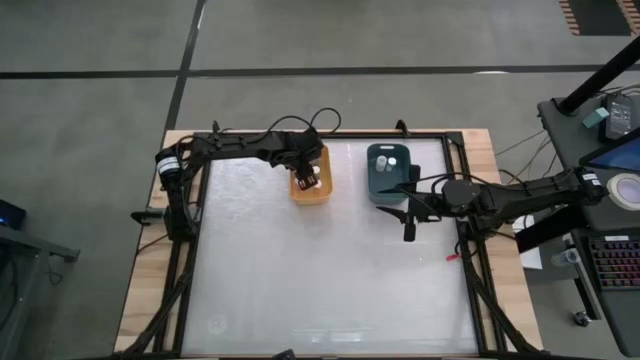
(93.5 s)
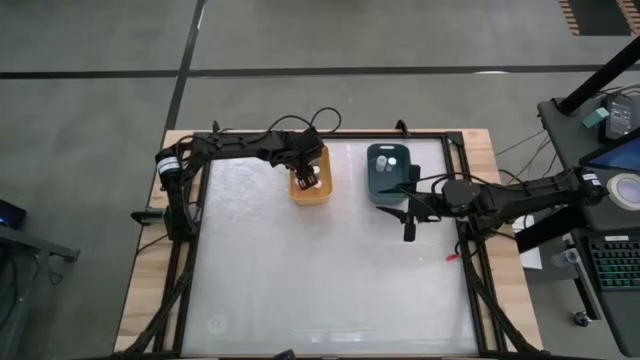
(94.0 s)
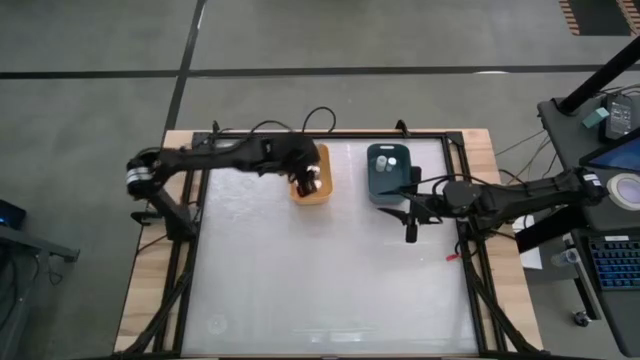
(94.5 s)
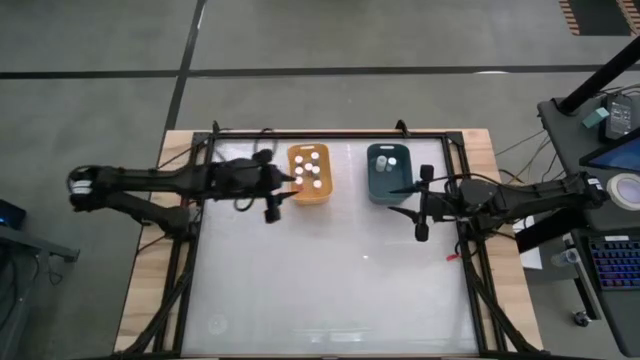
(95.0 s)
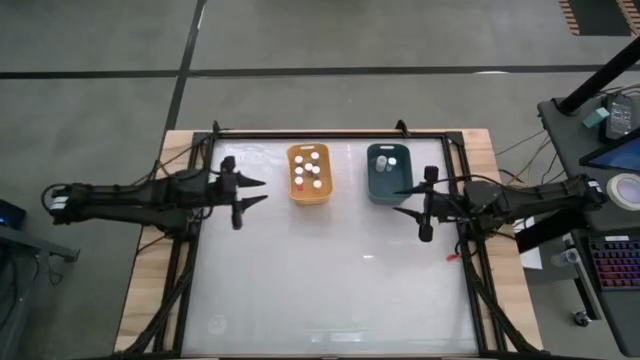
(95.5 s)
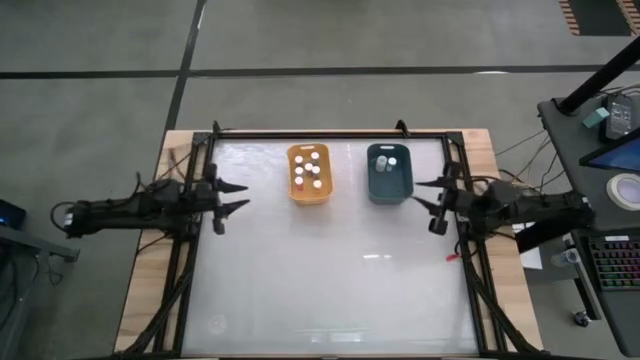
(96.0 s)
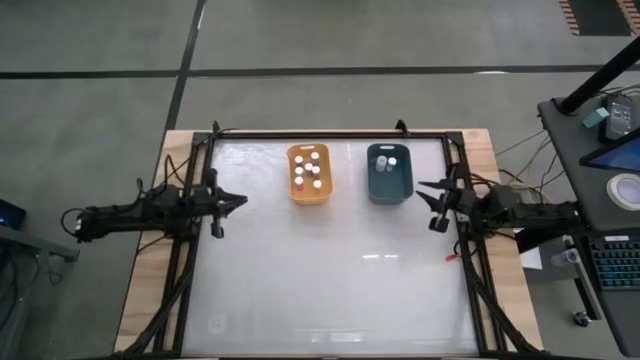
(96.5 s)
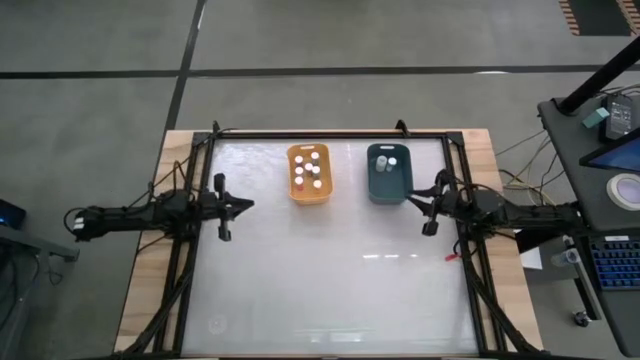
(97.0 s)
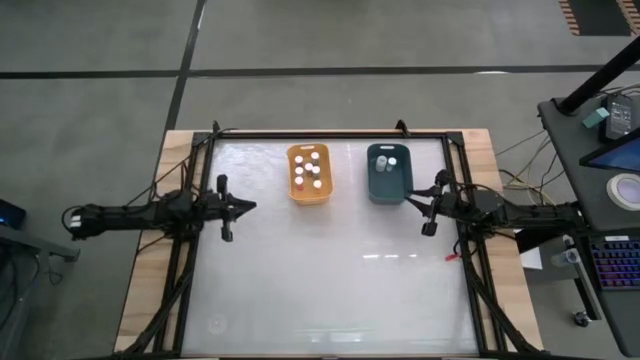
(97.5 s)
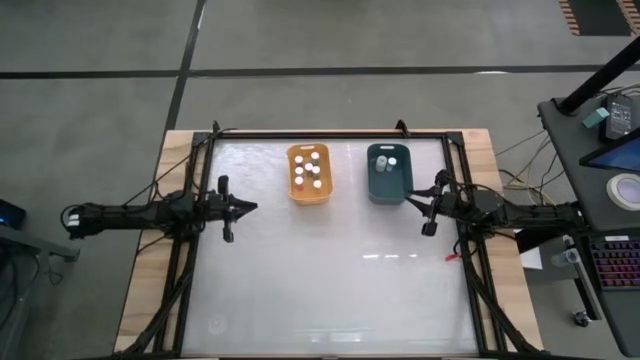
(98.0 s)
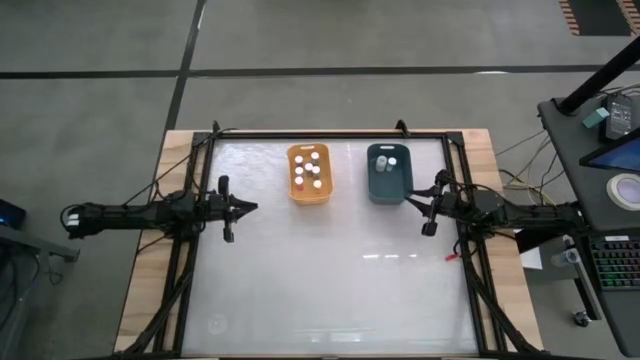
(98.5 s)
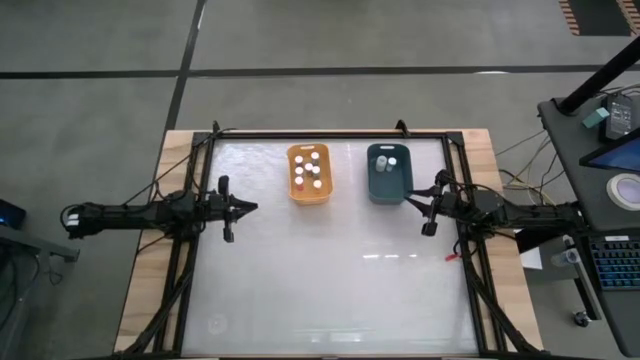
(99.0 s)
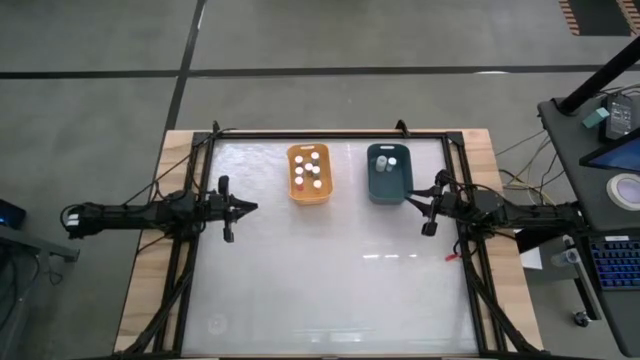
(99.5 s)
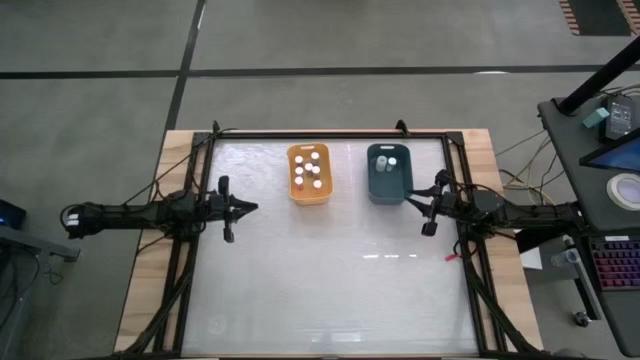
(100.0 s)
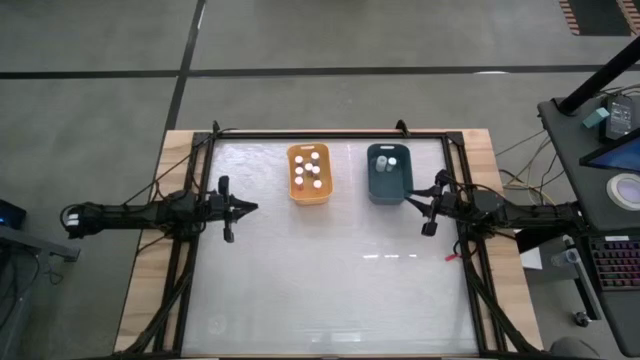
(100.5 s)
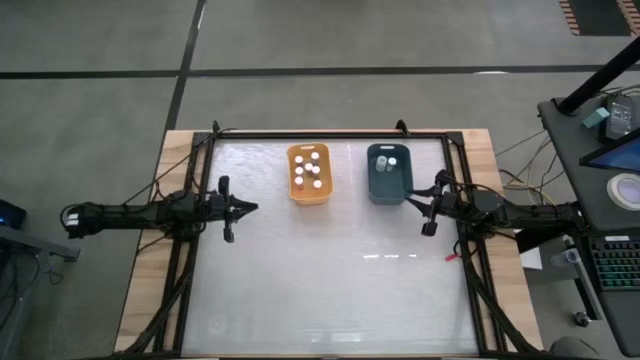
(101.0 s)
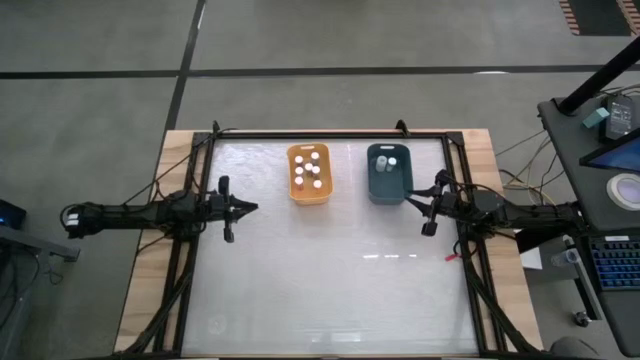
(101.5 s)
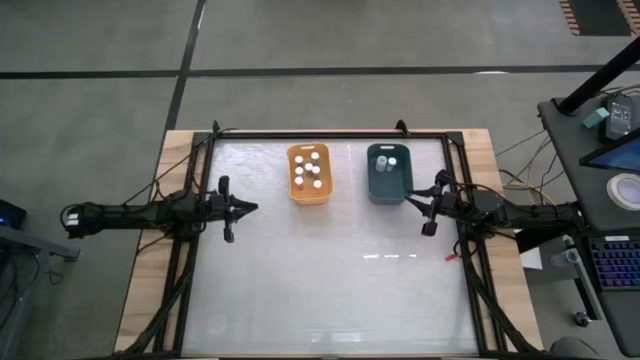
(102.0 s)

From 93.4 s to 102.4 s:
Task: Pick and place medicine bottles into bin by pill shape (circle, oval)
Return to Home Position

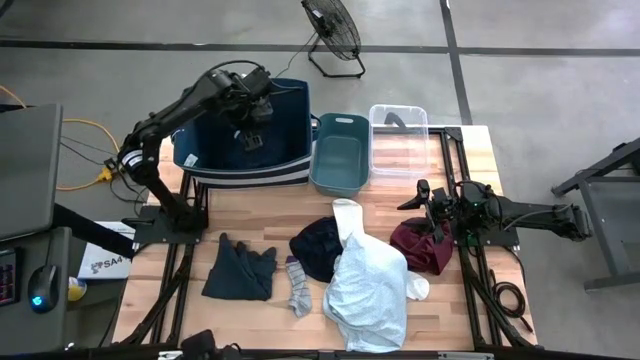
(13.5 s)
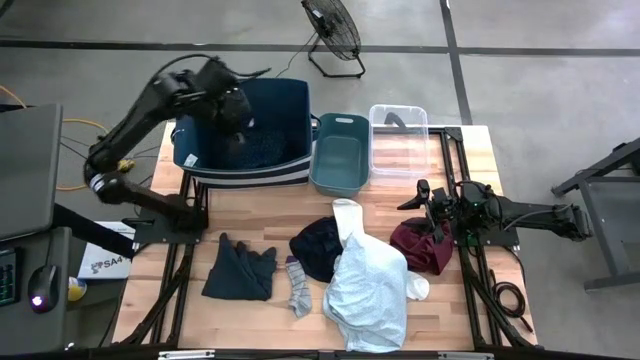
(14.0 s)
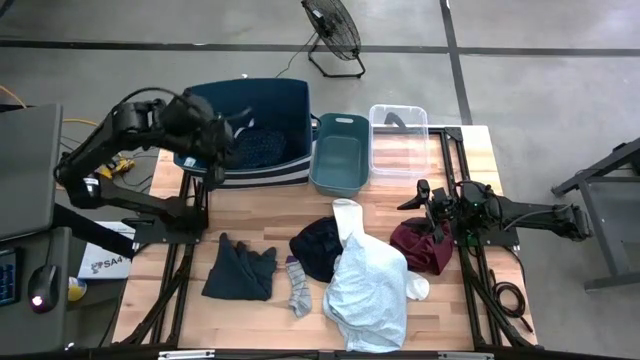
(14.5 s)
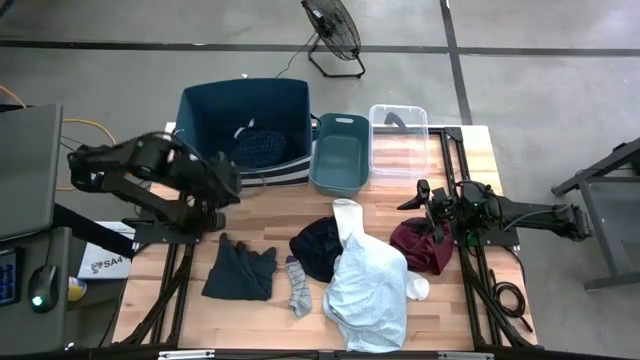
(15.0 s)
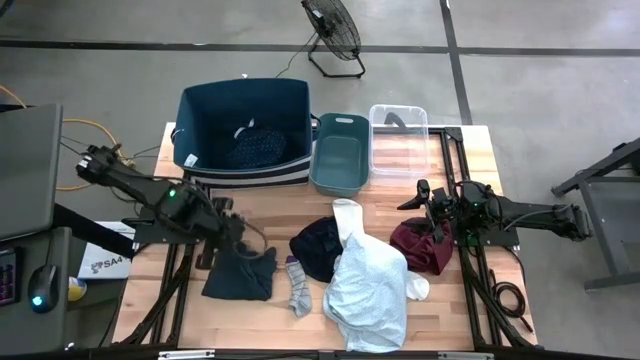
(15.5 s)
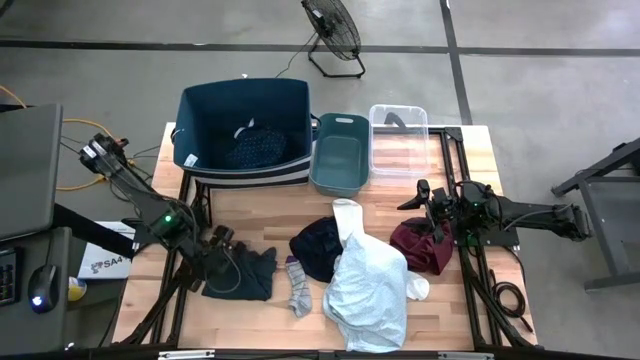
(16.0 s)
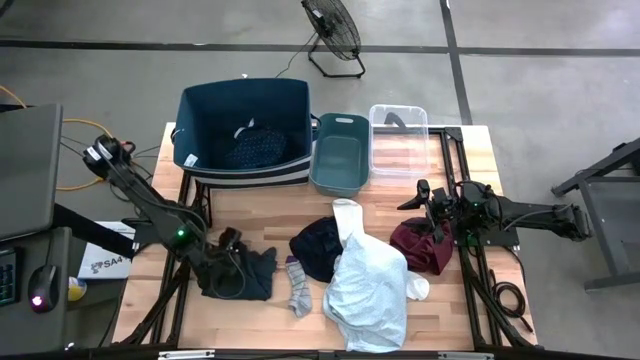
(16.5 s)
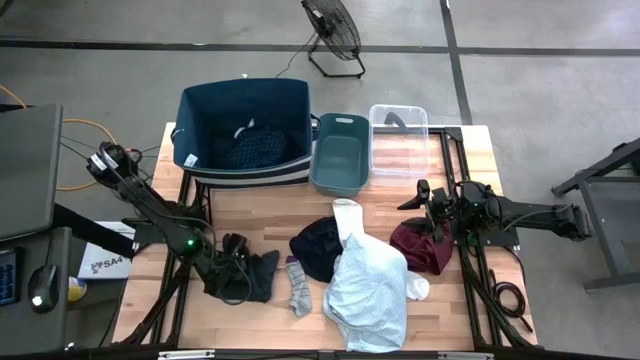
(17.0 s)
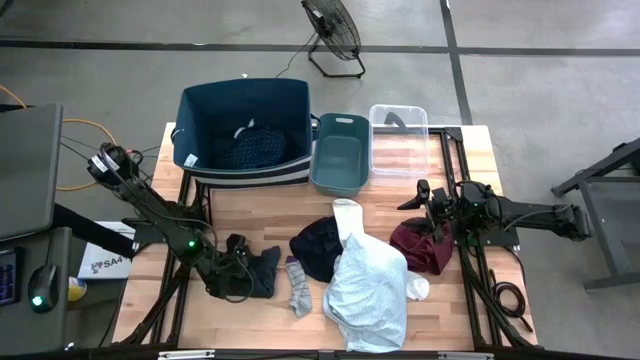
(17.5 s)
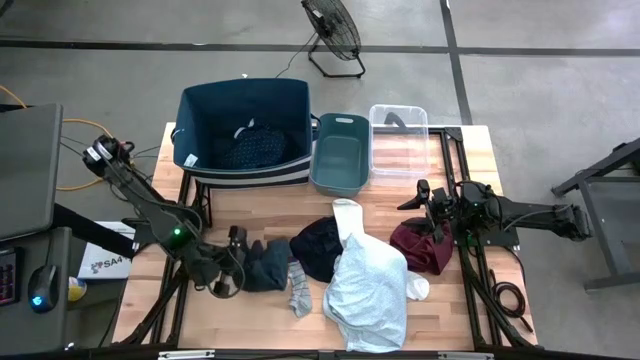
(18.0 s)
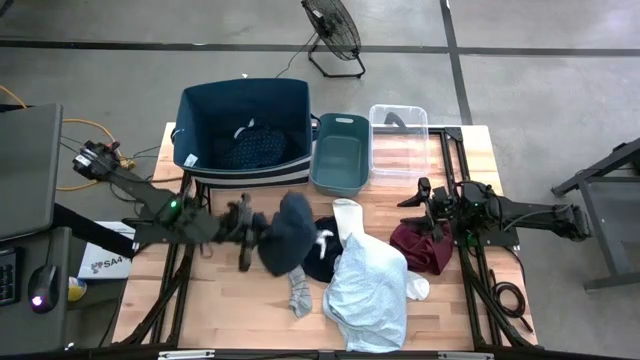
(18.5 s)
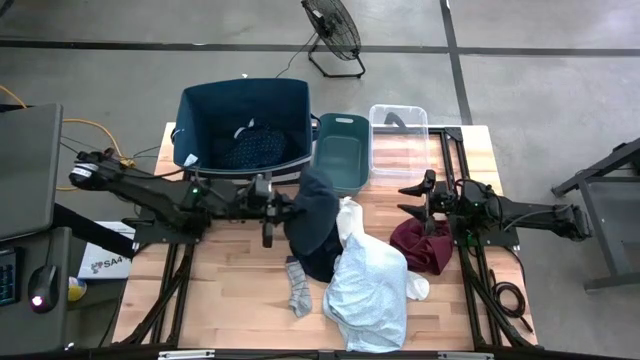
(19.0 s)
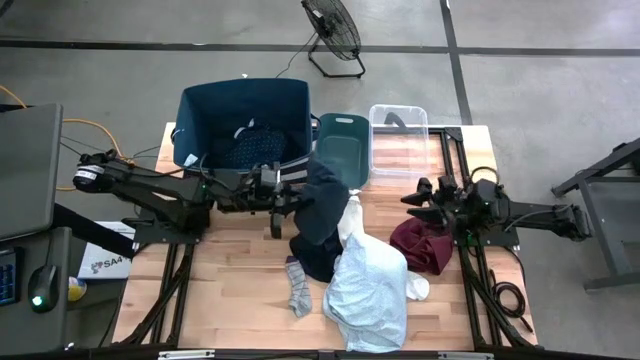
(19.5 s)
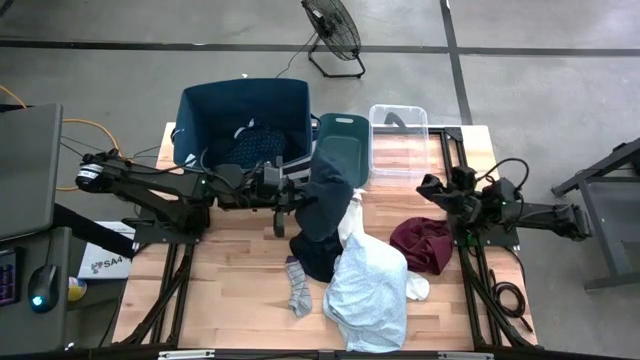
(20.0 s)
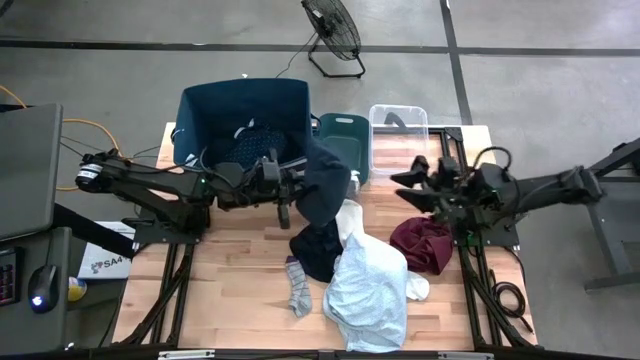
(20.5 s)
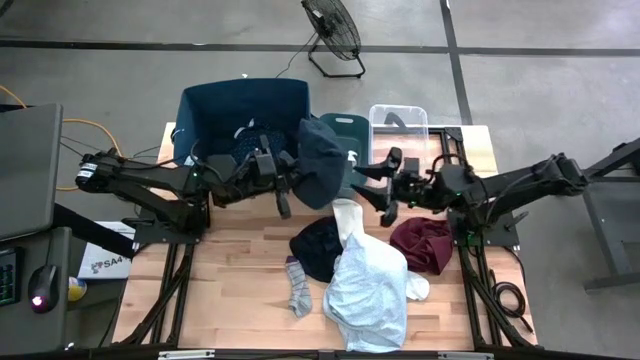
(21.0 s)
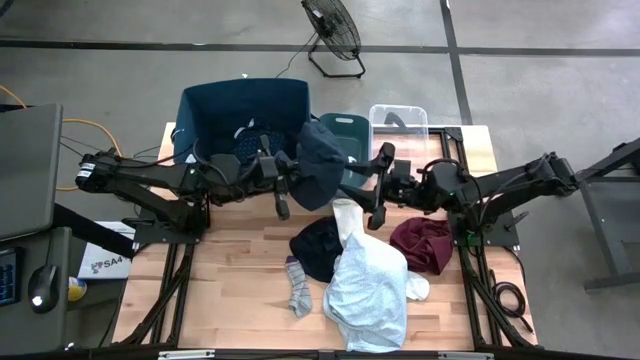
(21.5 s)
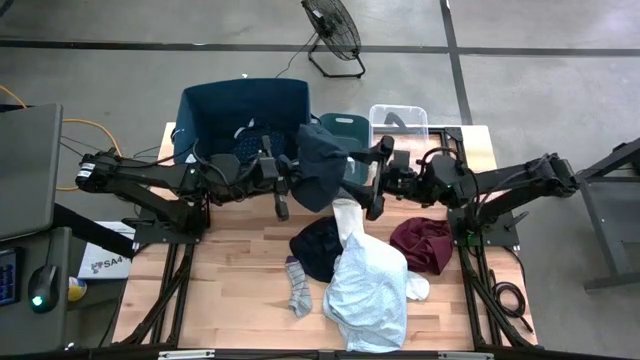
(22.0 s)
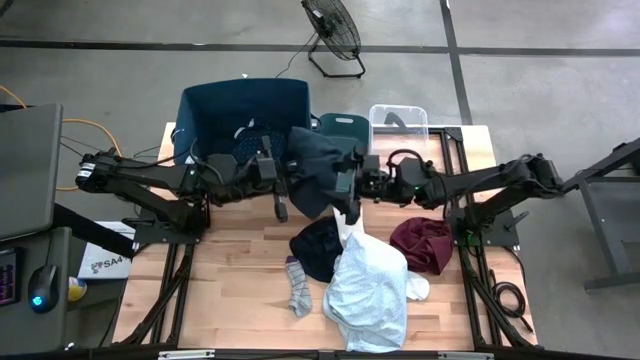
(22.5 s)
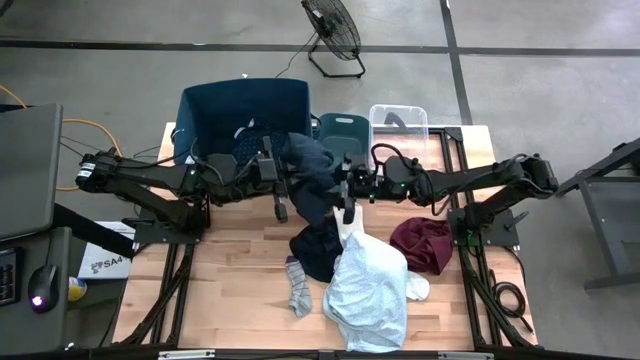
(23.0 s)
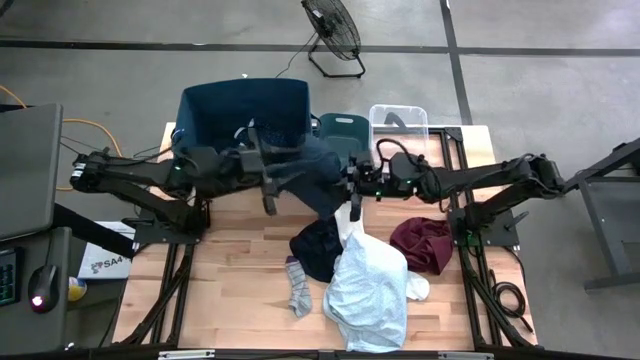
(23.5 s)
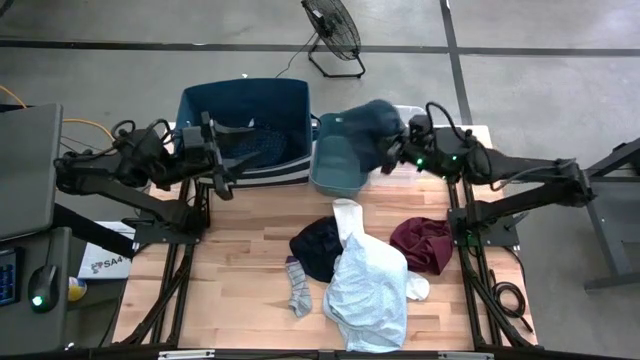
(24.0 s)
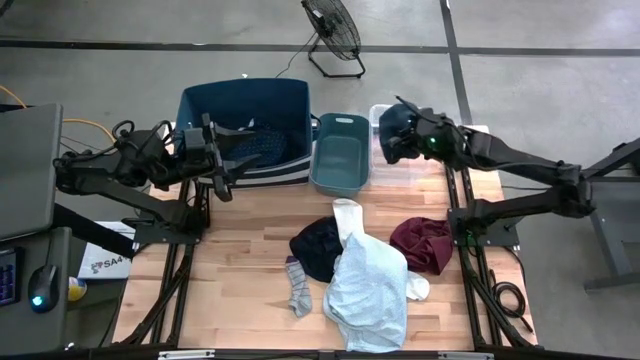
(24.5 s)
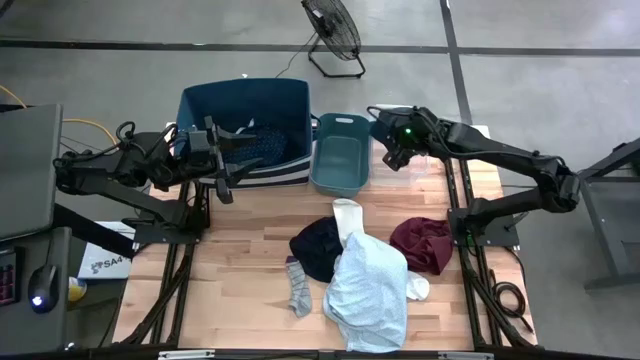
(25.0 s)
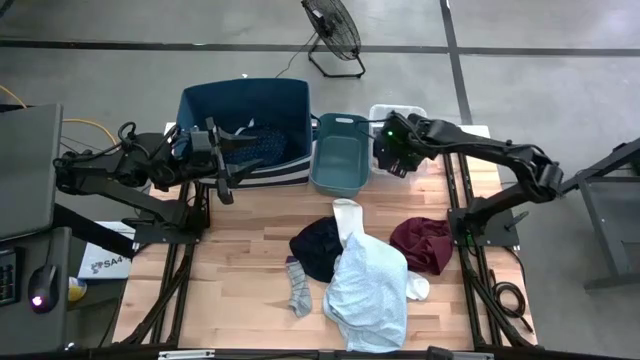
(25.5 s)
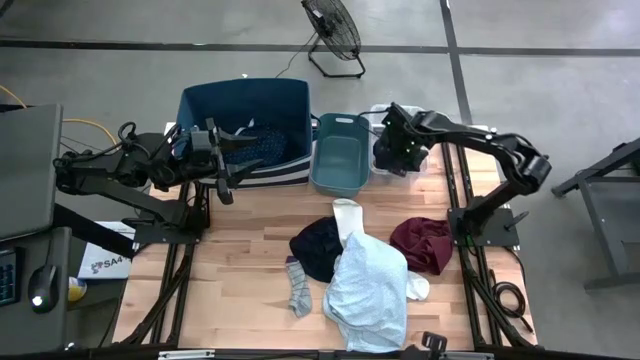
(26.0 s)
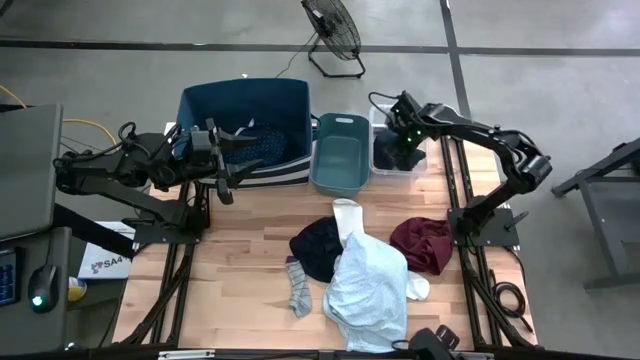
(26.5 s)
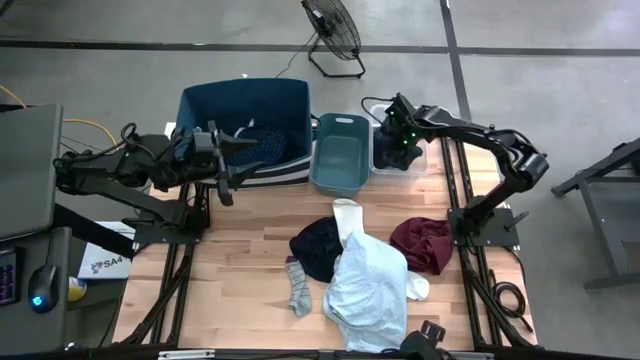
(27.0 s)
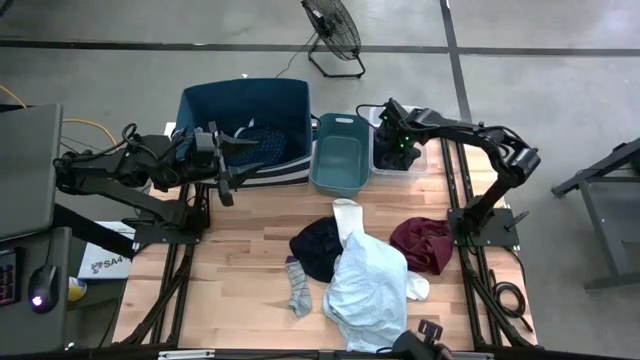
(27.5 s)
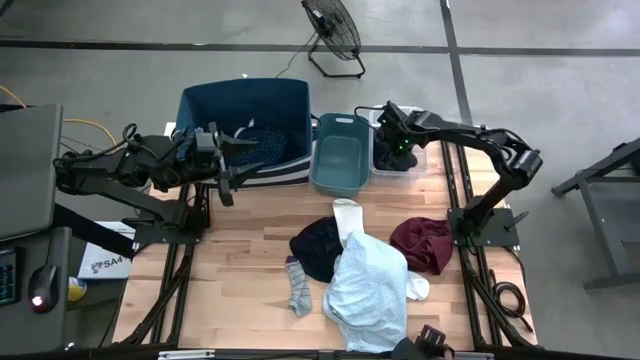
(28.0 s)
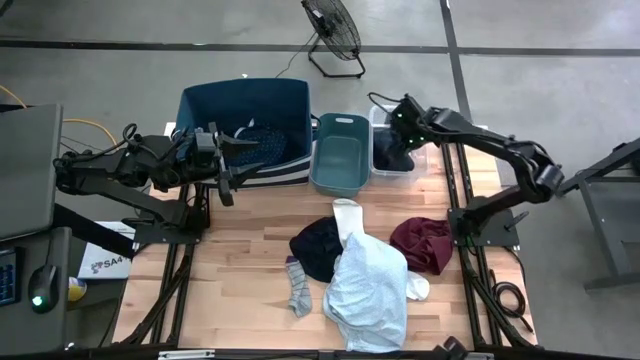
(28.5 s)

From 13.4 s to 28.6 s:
Task: Pick & Place Cloths
Put the black underwear into the transparent bin
